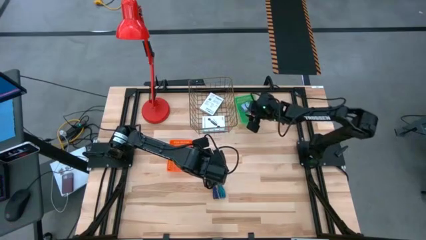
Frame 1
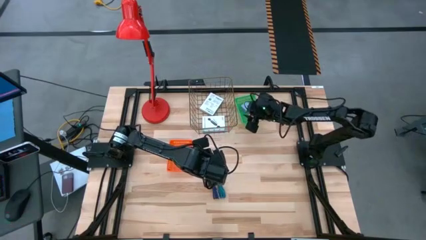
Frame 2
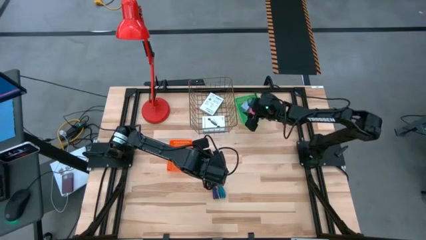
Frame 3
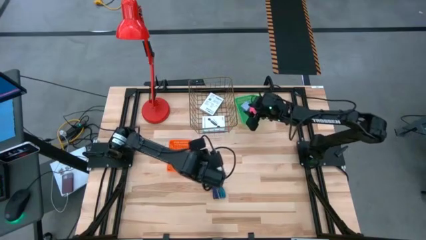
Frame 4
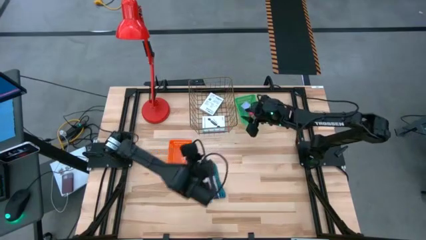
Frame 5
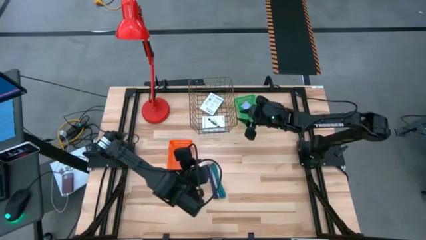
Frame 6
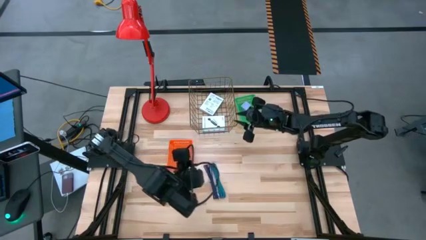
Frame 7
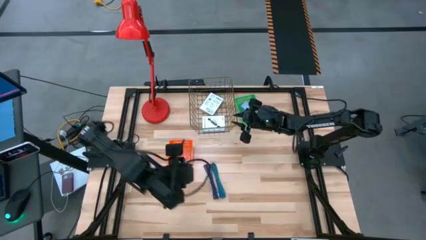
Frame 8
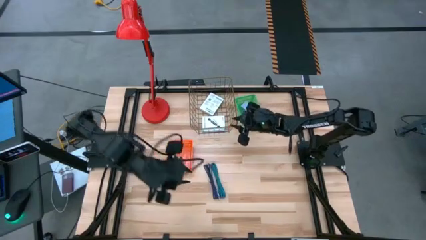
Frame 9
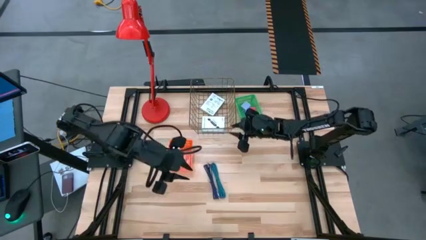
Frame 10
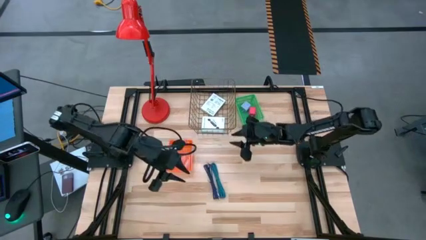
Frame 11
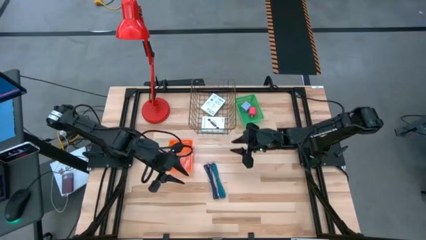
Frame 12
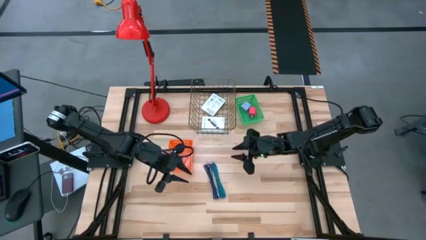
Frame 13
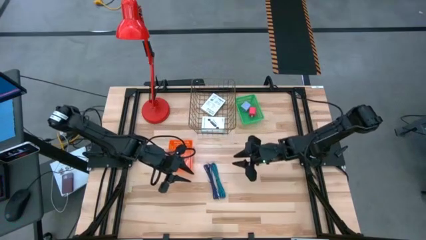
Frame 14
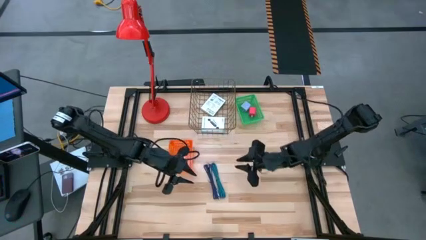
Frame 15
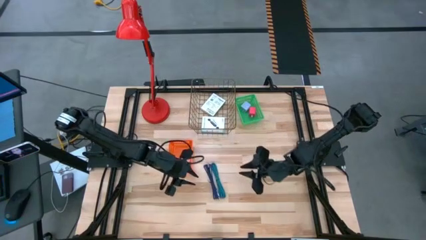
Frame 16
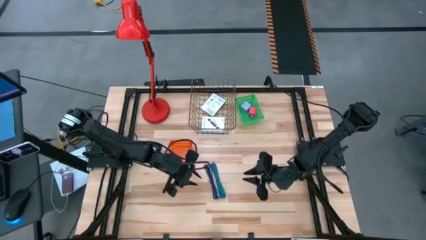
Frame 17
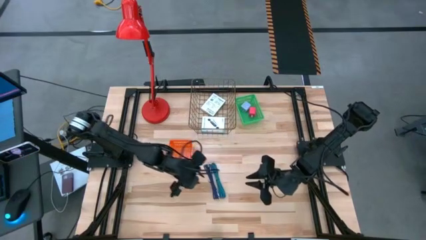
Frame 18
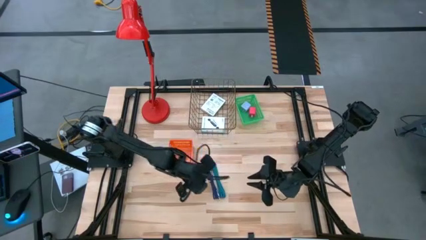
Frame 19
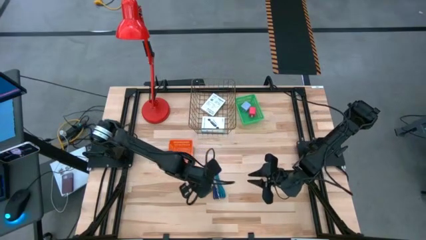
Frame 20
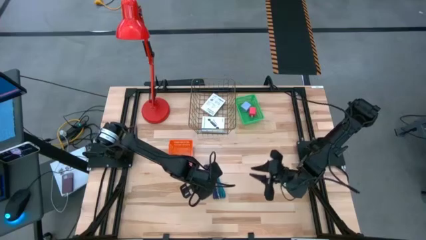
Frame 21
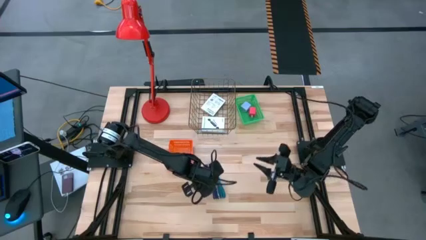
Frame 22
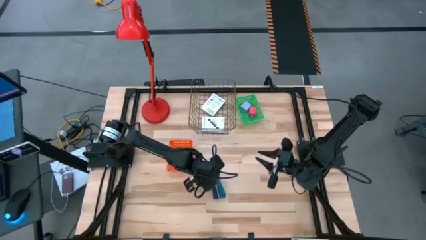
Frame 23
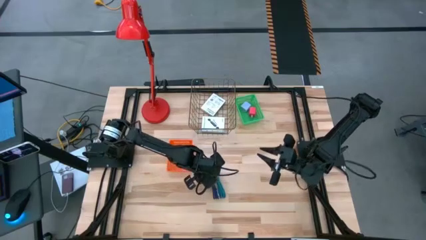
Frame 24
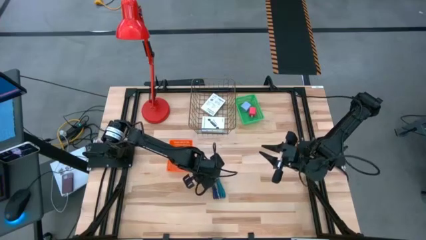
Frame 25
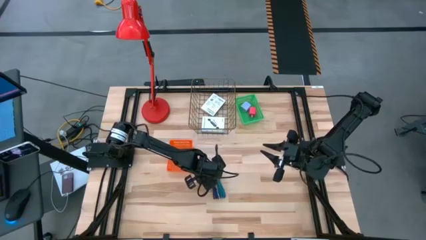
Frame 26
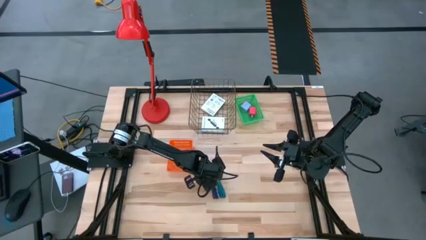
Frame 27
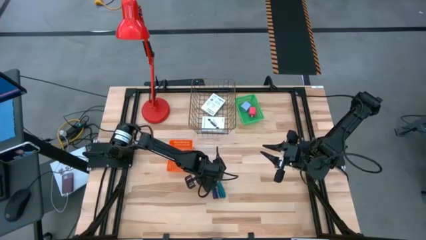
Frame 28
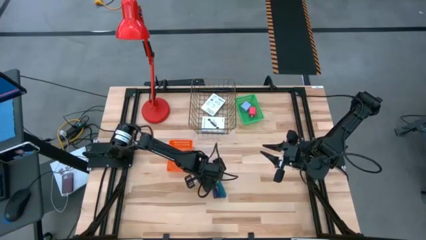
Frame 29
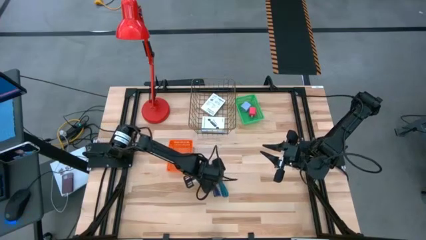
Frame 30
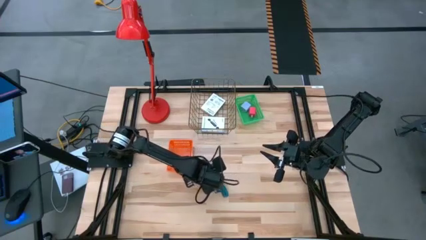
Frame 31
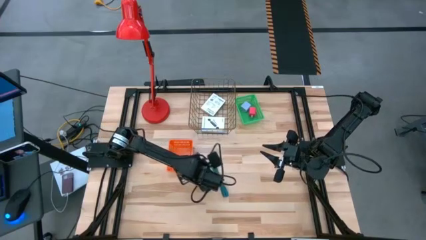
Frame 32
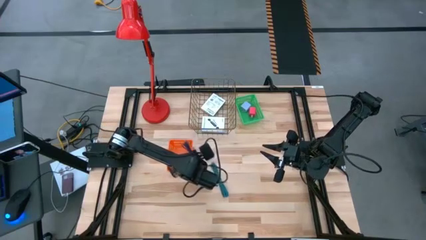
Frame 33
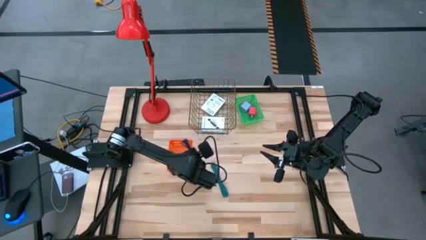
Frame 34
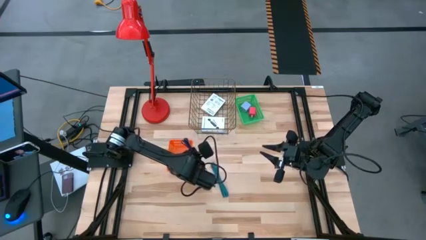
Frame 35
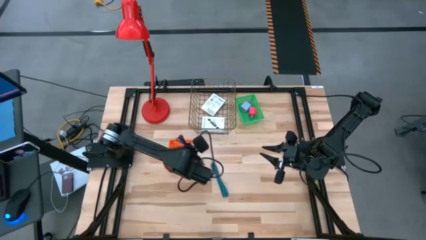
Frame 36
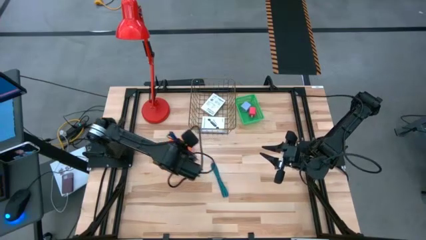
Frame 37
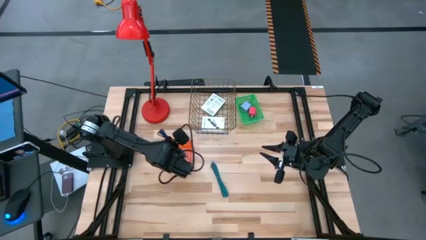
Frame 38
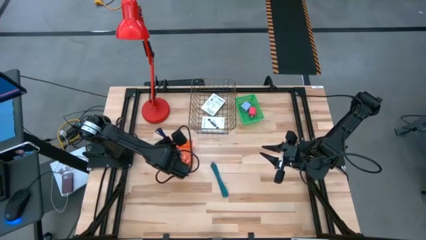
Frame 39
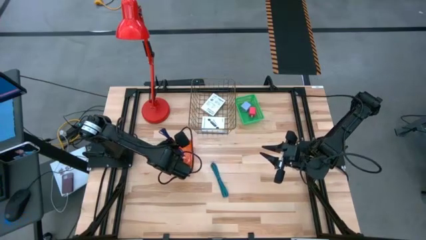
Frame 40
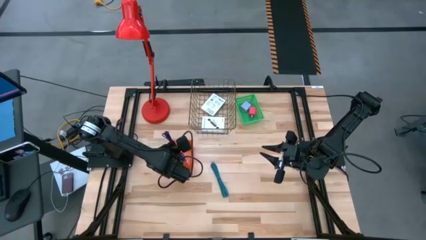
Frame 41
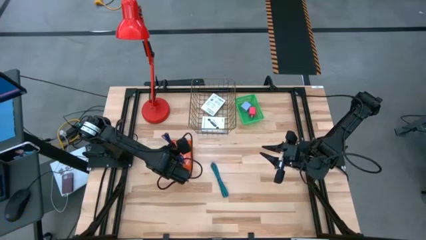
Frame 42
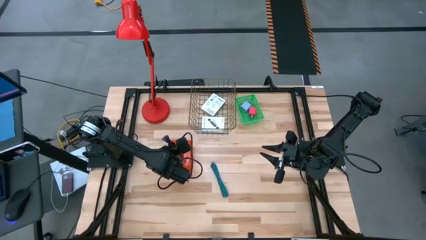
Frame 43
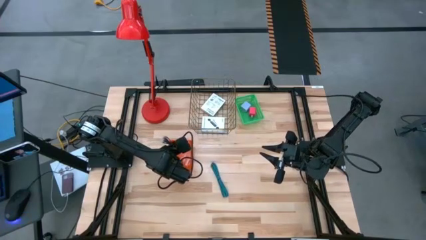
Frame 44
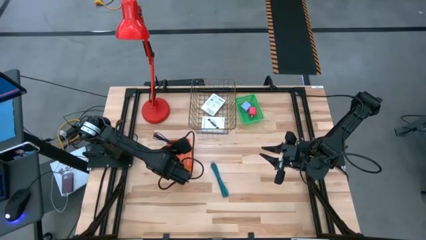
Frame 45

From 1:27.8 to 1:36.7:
Task: Pick and place items into bin
Put the dark blue charger cable into the orange bin

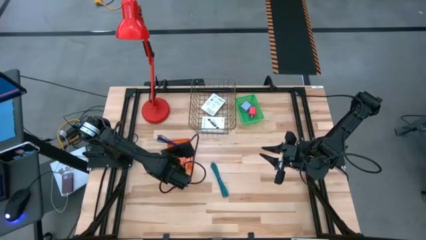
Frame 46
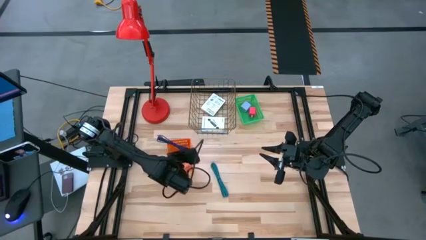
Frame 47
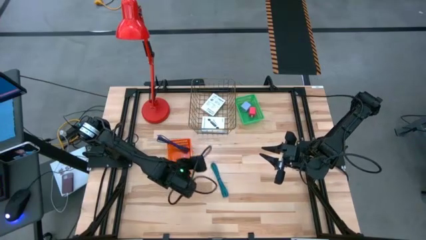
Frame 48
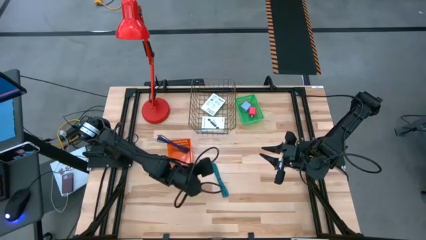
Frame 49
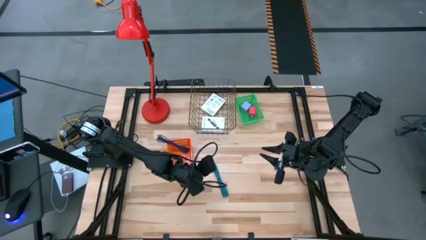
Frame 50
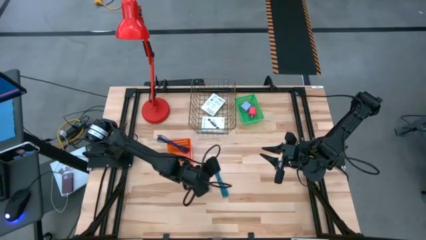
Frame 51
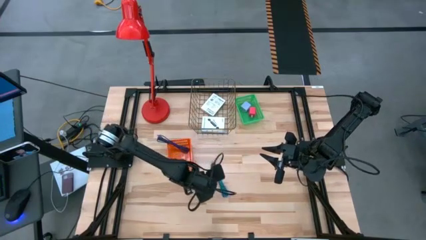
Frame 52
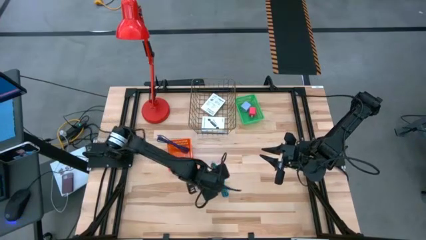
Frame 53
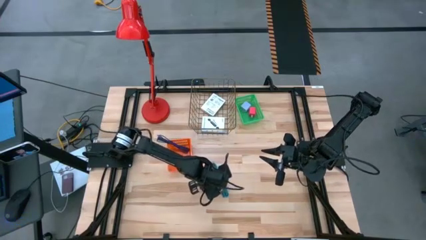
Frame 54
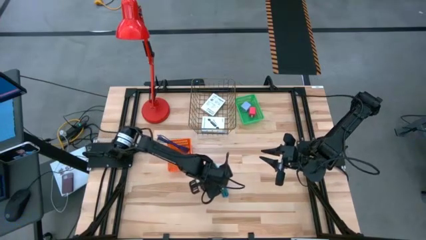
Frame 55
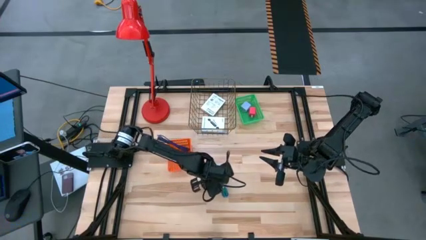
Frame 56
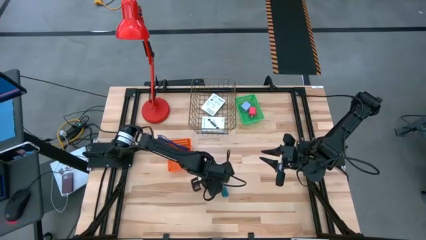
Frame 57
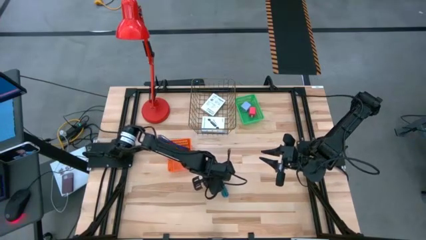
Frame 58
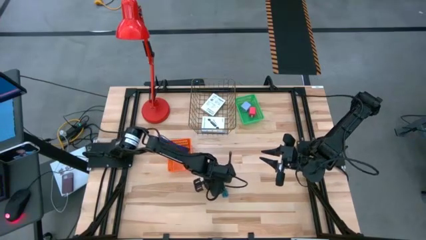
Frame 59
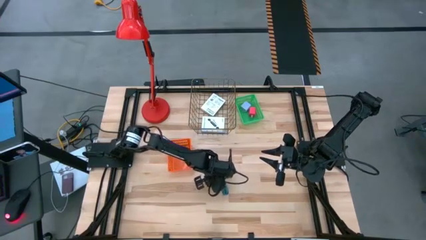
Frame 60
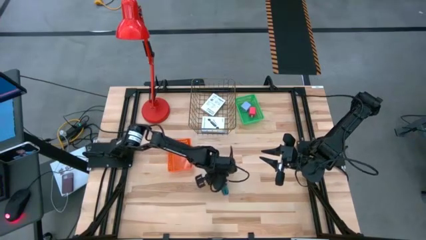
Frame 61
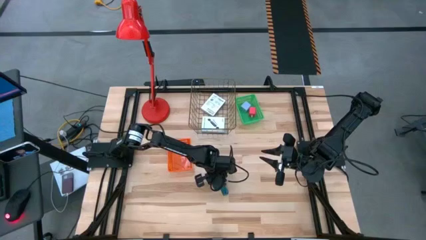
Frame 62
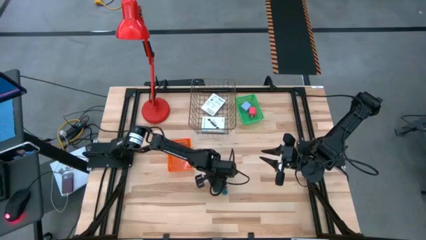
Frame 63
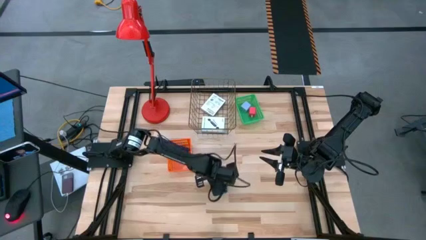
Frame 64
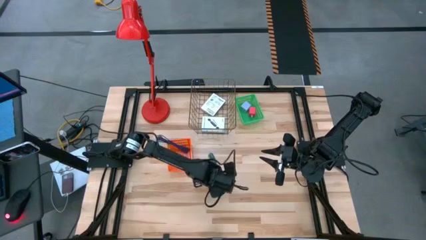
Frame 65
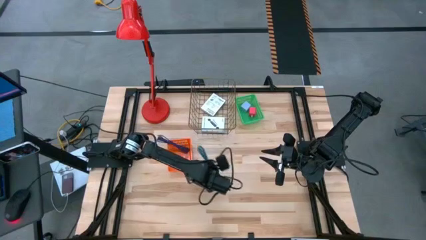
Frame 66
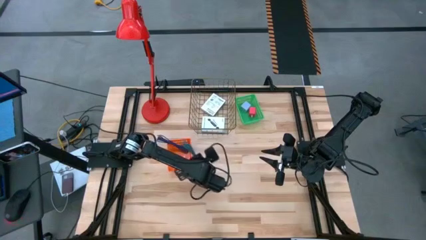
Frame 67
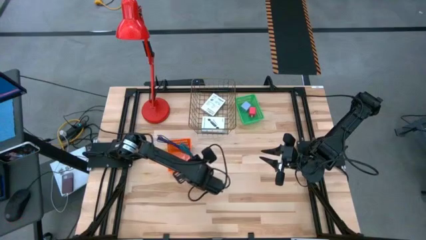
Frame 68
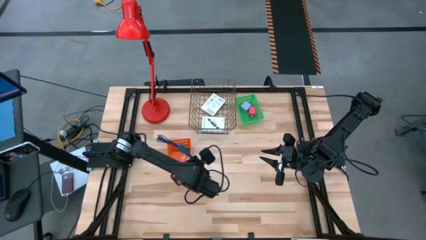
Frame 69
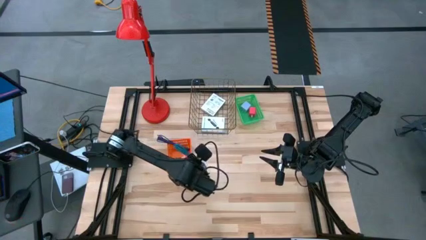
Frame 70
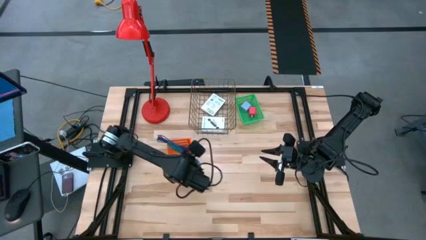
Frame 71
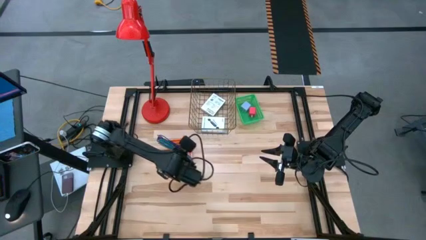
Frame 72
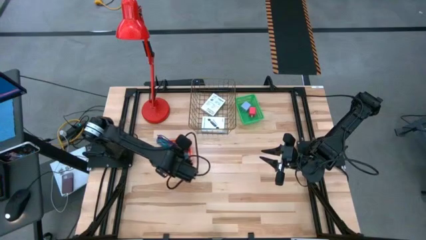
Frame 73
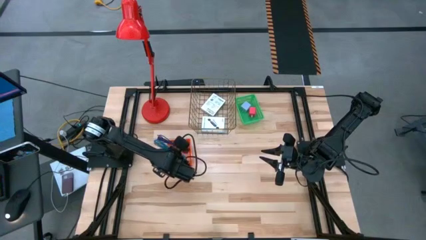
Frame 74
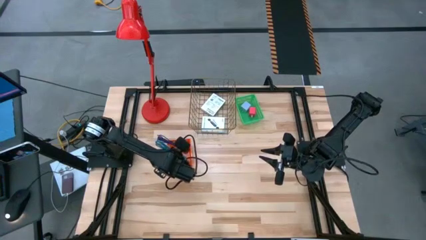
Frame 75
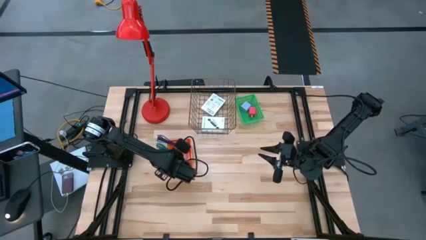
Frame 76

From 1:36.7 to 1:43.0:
Put the blue charger cable into the orange bin
